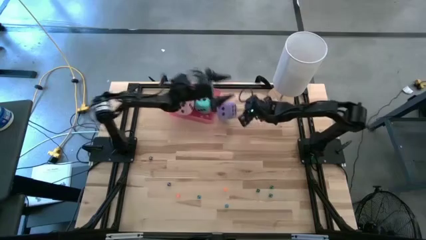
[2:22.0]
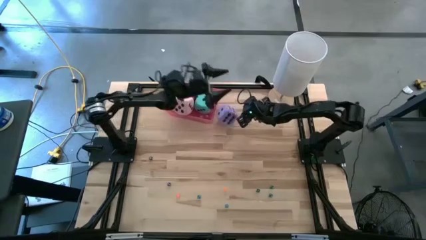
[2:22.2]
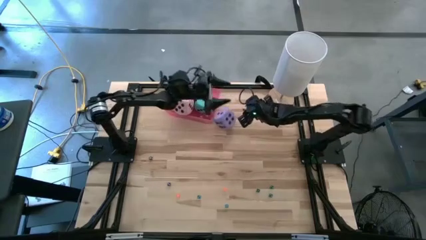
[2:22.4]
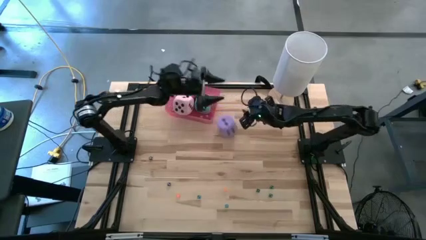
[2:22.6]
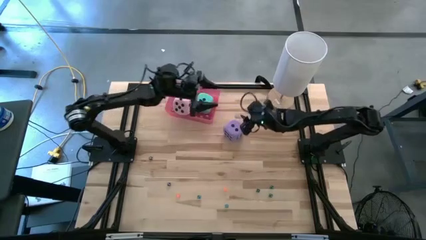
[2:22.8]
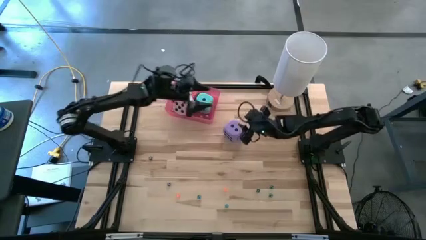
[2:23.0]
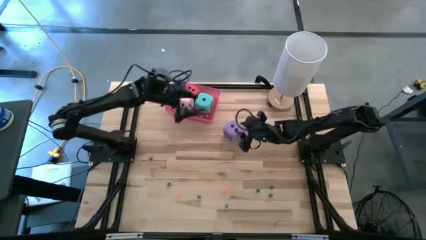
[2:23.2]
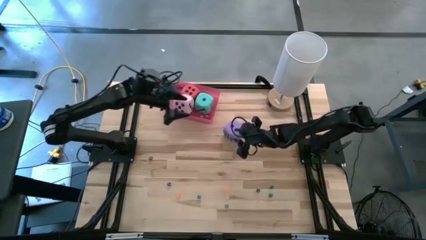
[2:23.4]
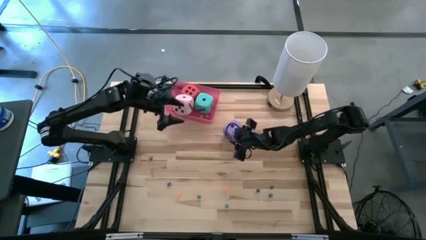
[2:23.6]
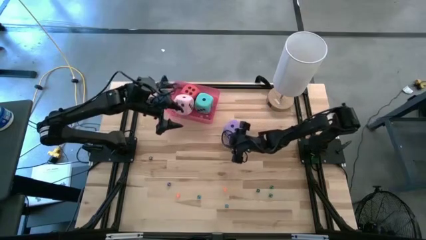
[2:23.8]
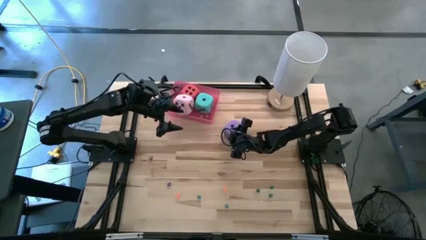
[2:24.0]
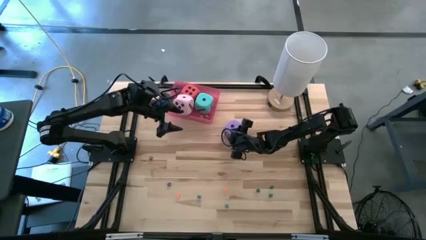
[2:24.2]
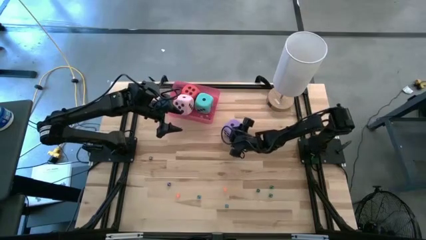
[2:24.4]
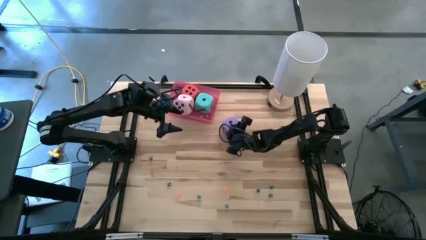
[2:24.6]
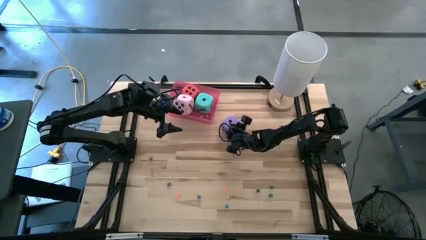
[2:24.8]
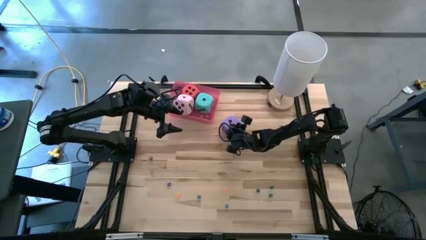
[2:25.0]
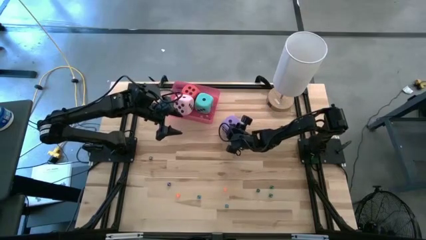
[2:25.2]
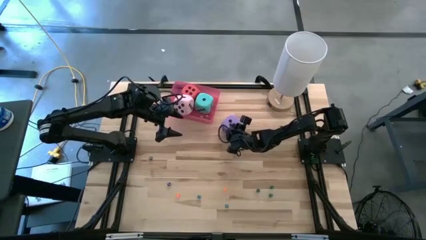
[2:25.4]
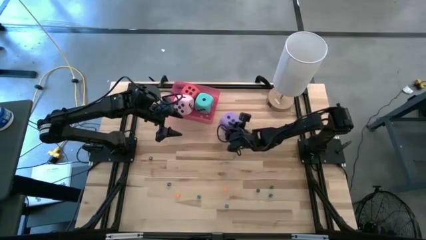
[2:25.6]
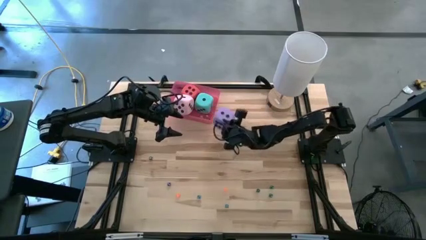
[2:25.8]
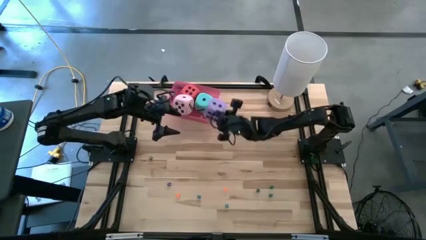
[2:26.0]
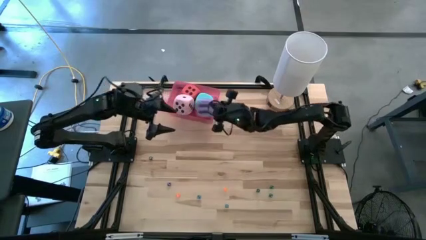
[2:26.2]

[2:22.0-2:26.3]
Task: Pick & Place Dice
Put the large purple dice into the pink bin

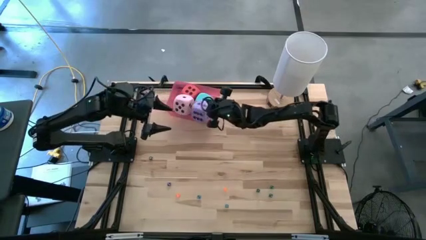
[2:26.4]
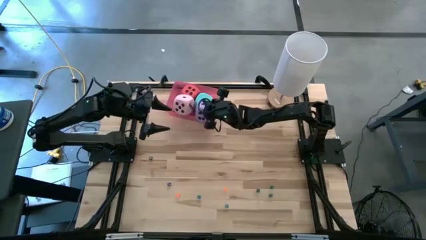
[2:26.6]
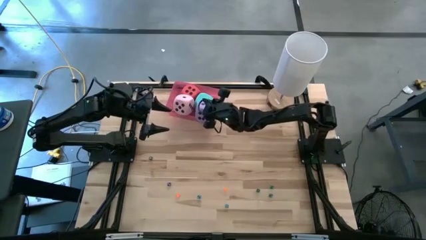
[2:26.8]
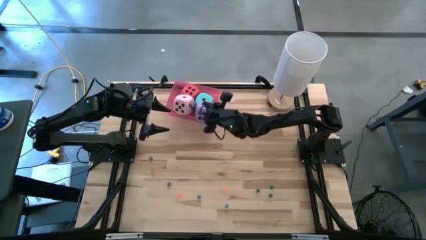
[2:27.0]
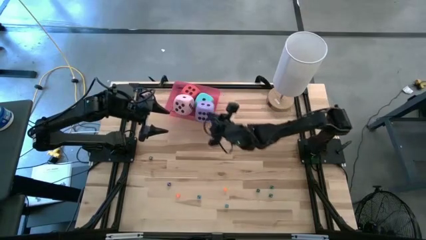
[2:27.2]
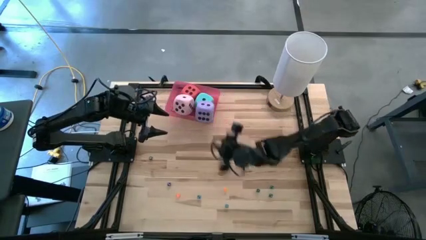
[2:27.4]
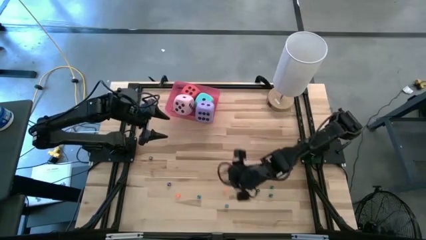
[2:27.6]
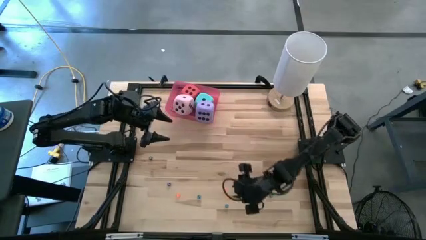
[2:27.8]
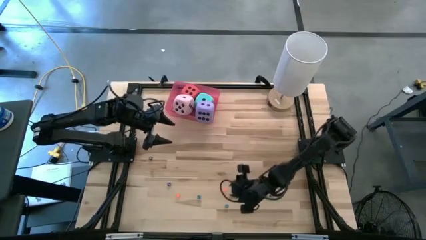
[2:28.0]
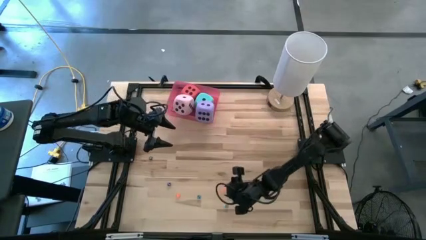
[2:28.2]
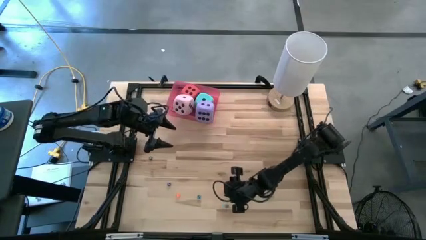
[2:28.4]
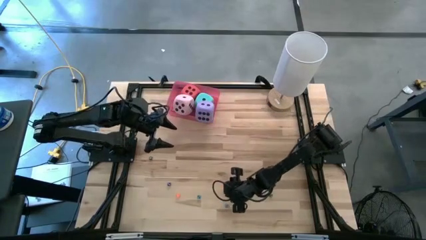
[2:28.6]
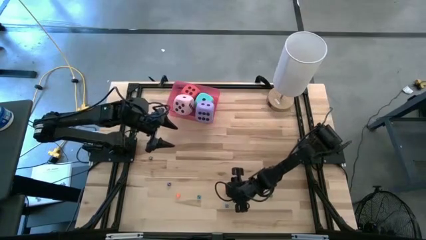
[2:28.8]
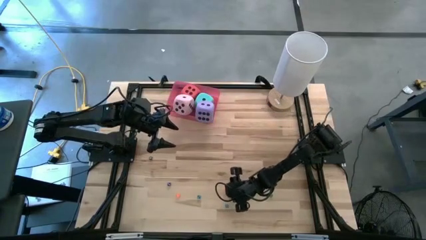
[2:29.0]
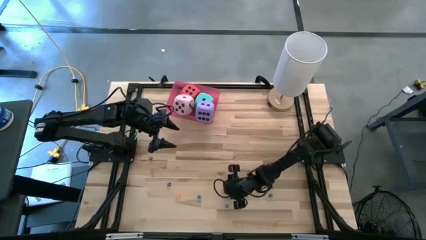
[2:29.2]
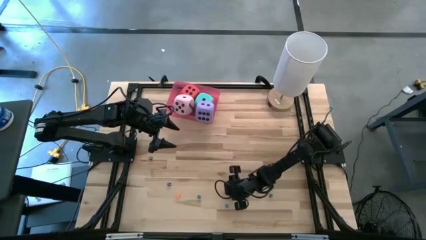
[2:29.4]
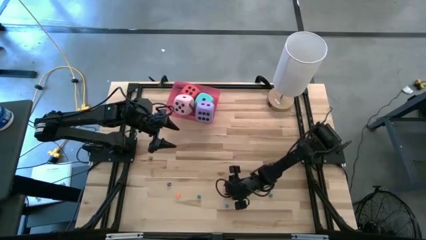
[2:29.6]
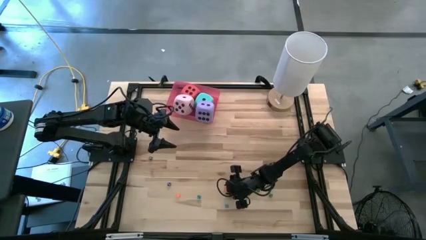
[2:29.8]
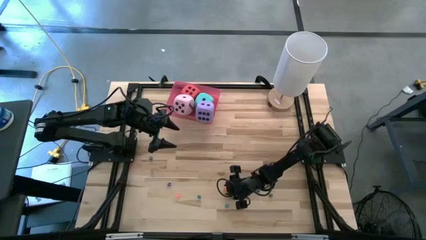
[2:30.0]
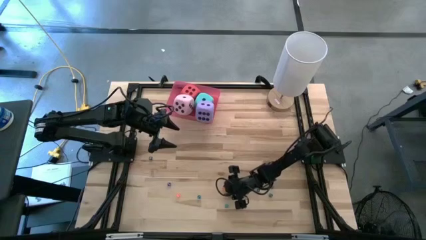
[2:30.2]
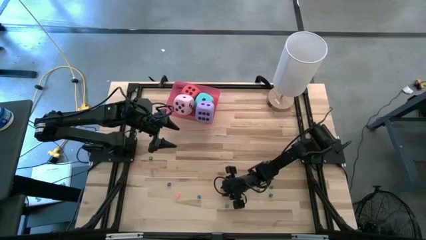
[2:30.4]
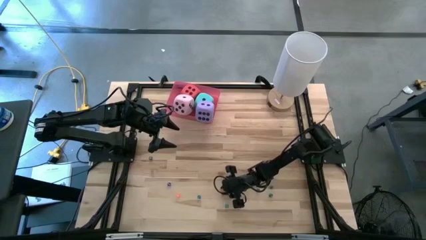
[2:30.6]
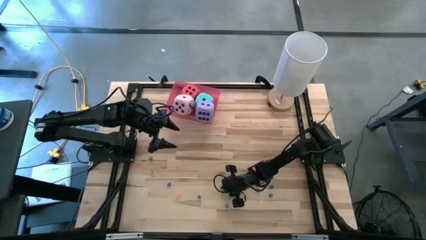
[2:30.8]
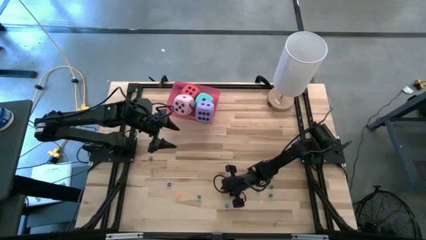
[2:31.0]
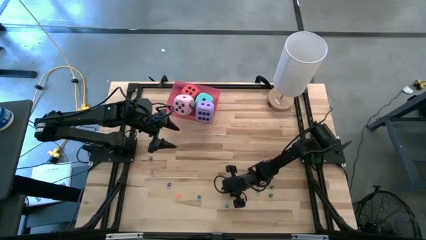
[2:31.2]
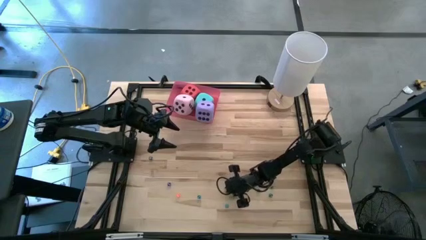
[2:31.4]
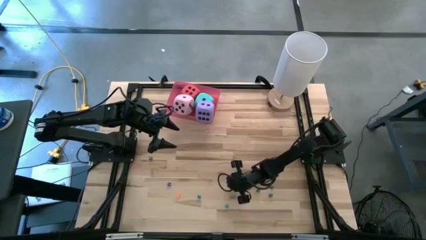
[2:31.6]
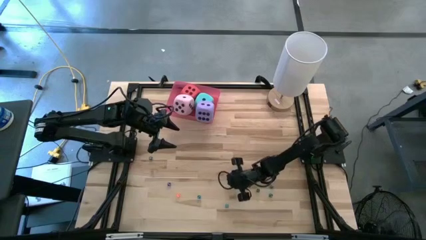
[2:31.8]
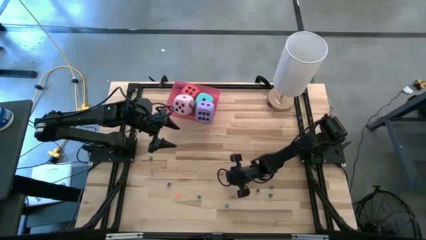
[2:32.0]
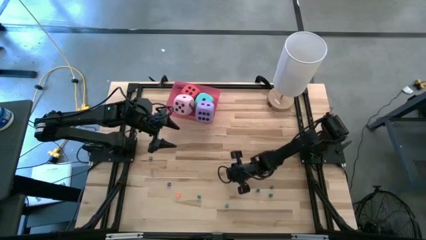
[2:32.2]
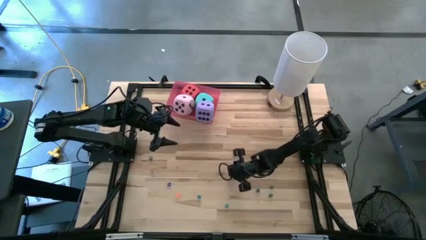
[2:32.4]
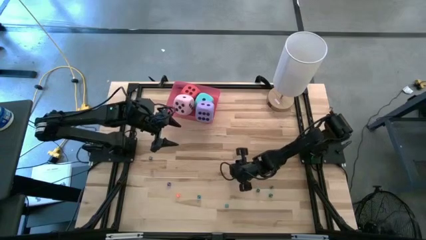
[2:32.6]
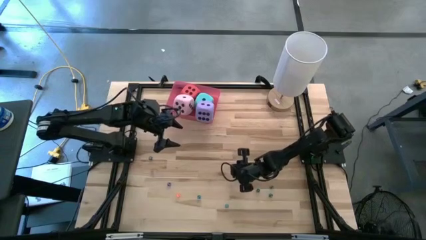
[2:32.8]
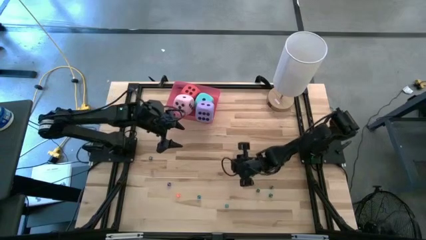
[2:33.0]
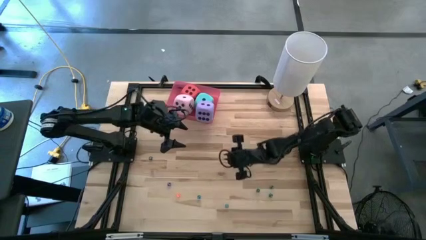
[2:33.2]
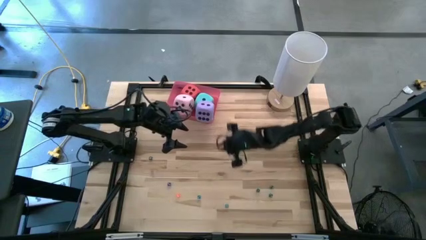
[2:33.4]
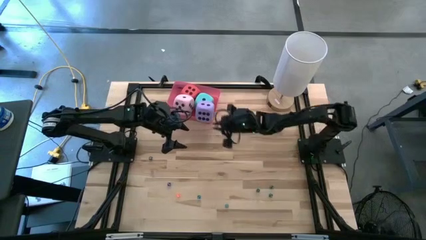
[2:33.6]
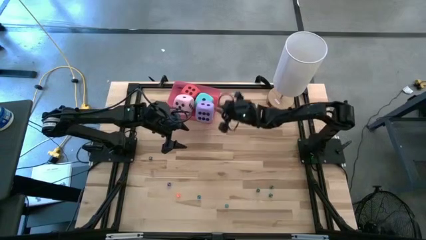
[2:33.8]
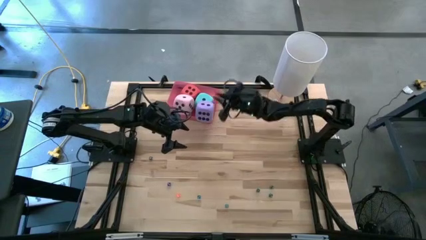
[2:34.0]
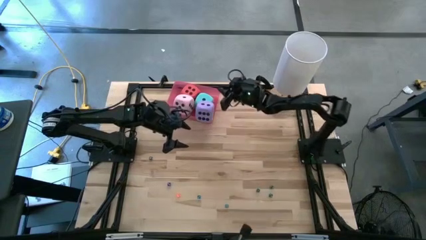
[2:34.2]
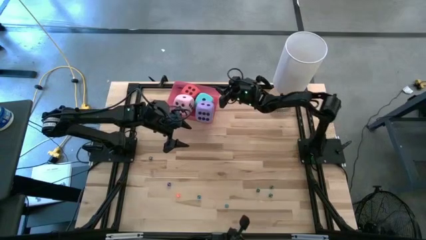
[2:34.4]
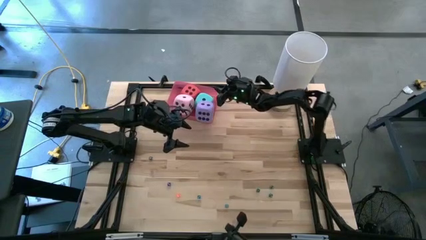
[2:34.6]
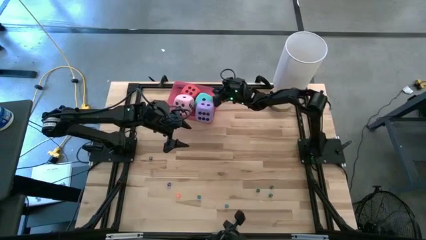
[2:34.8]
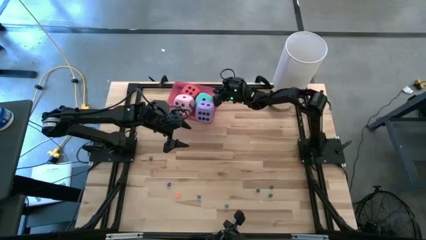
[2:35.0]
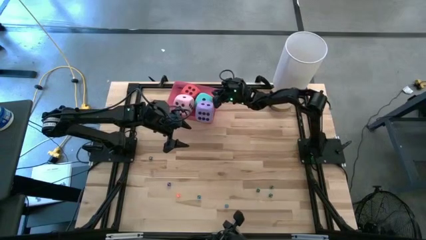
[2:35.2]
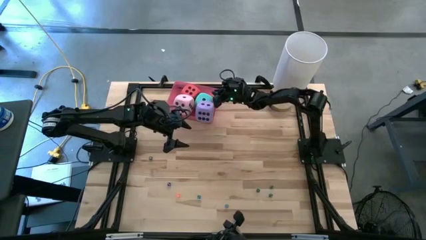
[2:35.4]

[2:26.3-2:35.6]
Put the small orange dice into the pink bin
